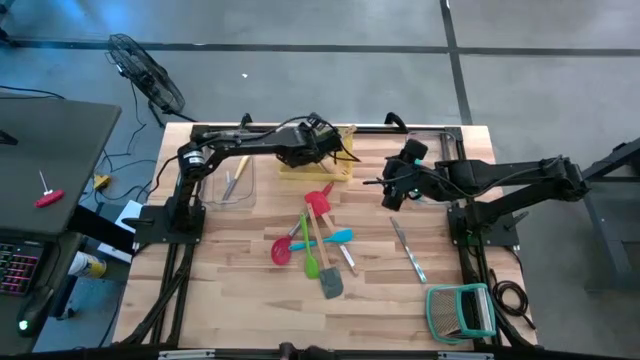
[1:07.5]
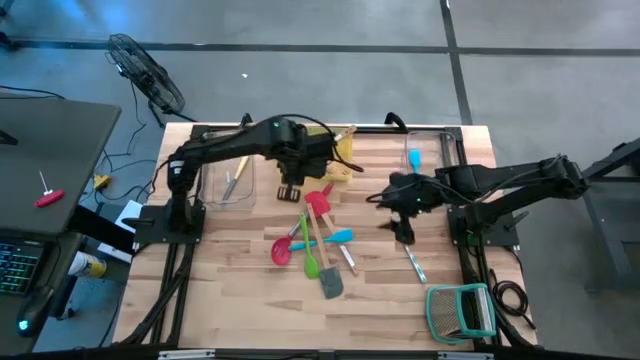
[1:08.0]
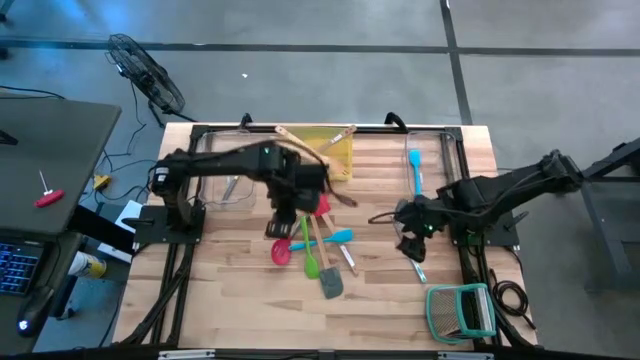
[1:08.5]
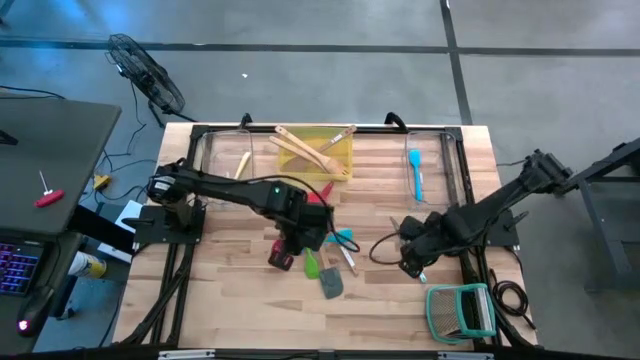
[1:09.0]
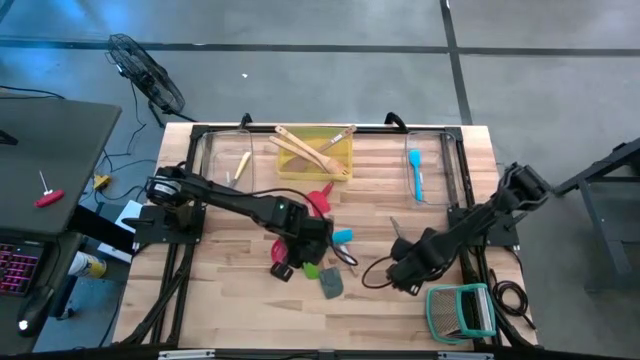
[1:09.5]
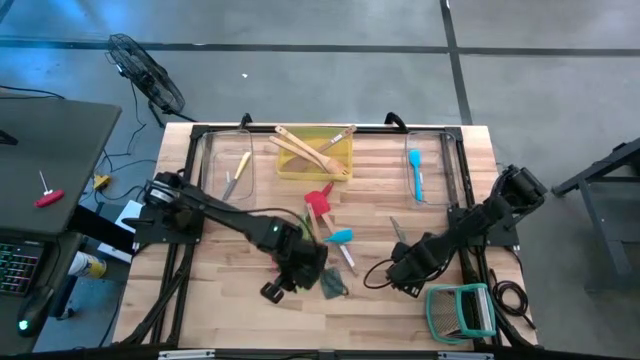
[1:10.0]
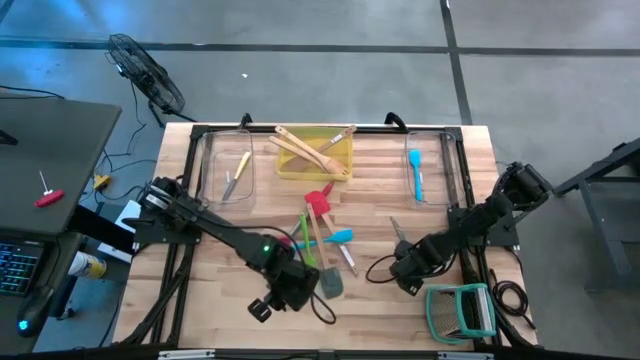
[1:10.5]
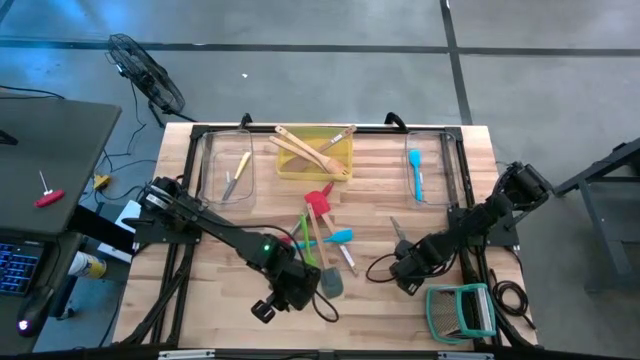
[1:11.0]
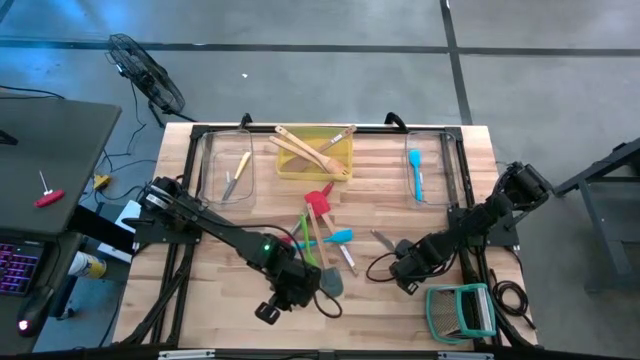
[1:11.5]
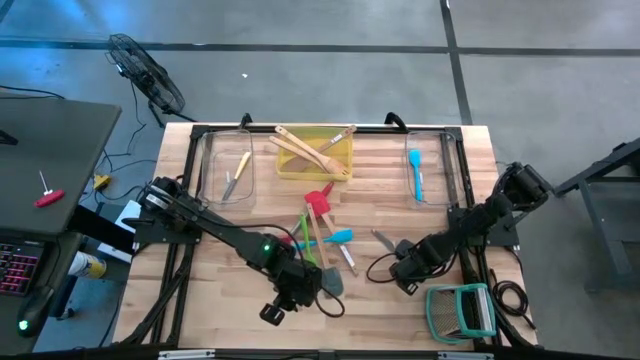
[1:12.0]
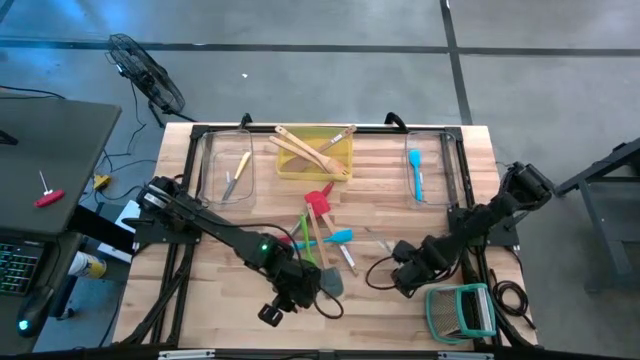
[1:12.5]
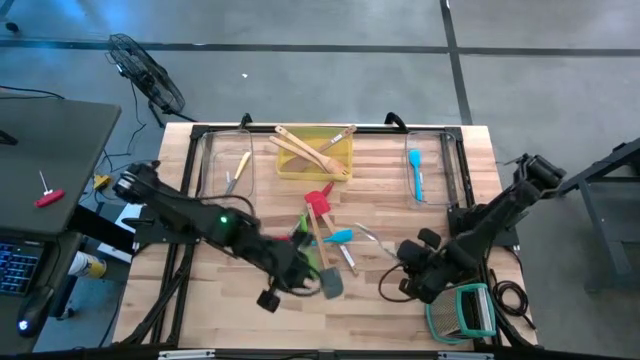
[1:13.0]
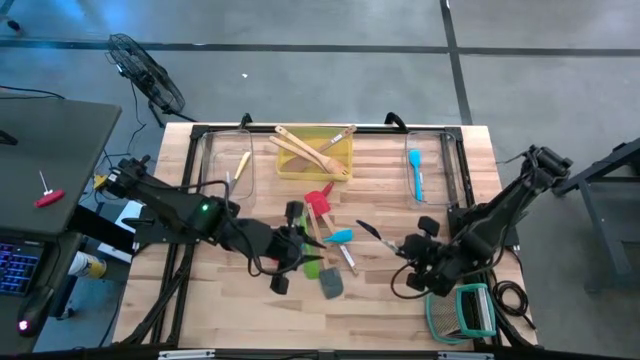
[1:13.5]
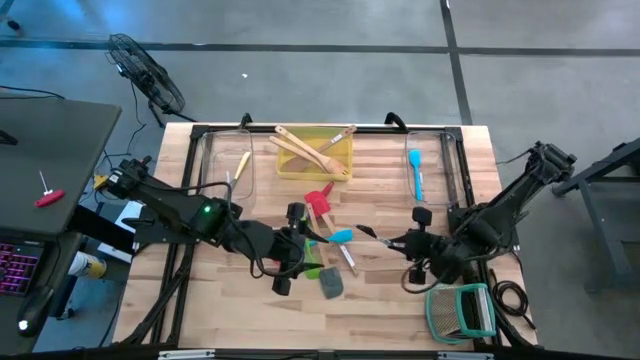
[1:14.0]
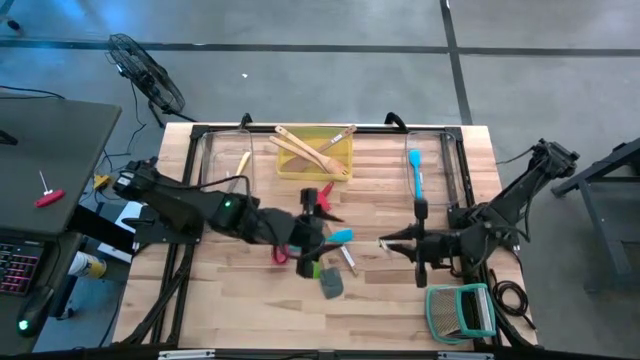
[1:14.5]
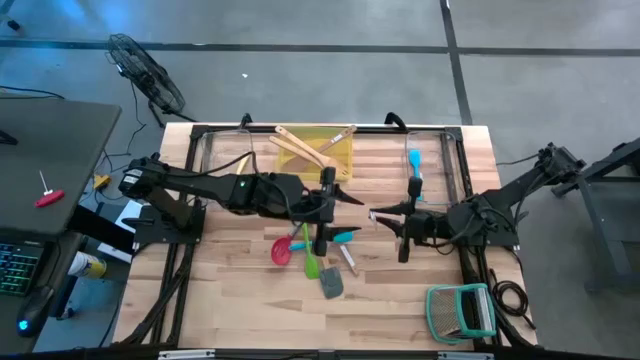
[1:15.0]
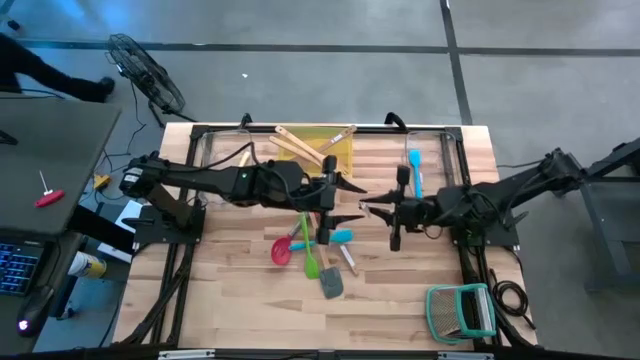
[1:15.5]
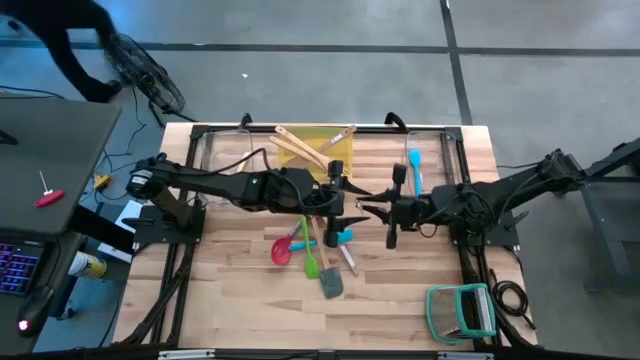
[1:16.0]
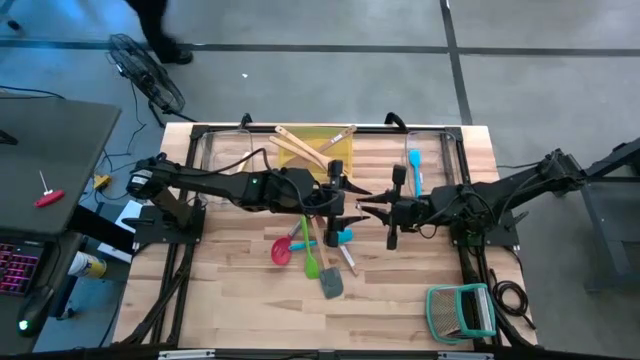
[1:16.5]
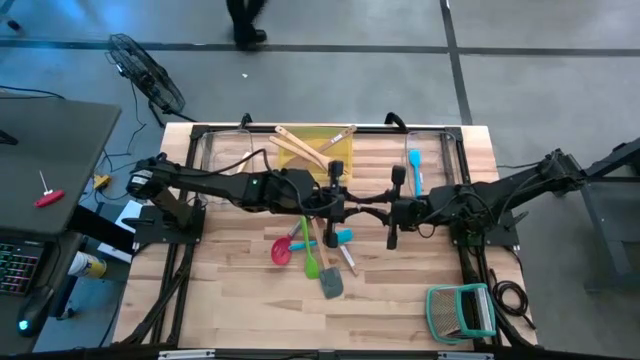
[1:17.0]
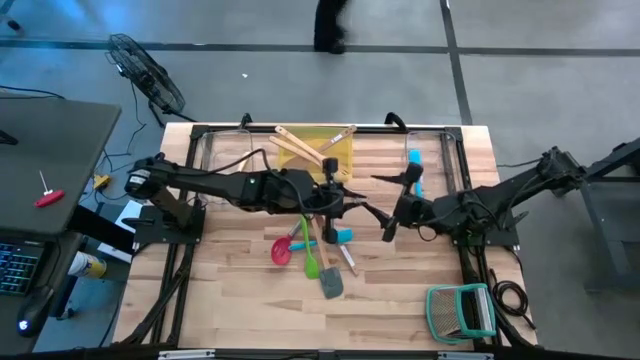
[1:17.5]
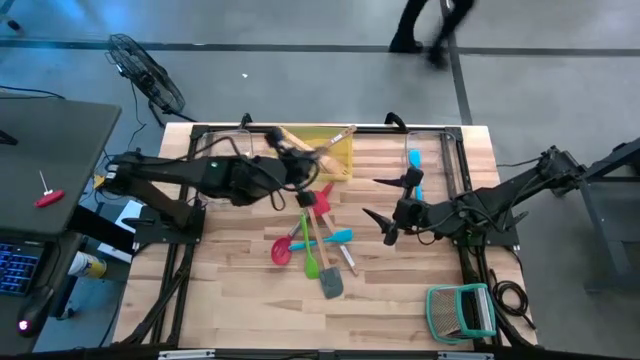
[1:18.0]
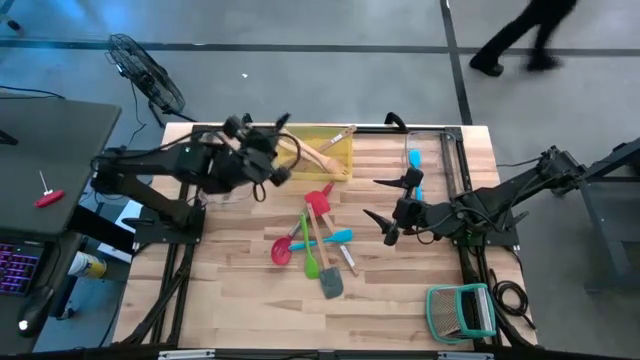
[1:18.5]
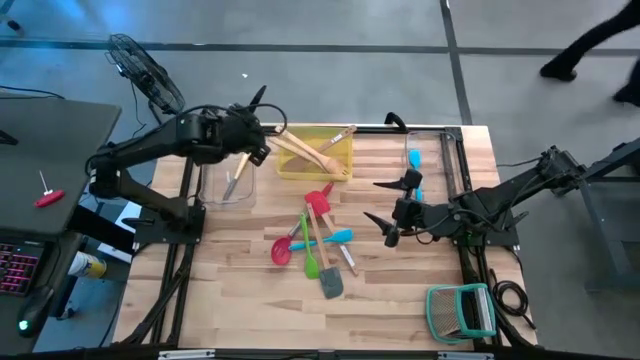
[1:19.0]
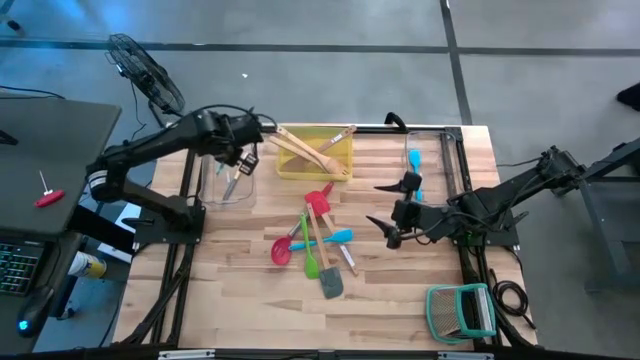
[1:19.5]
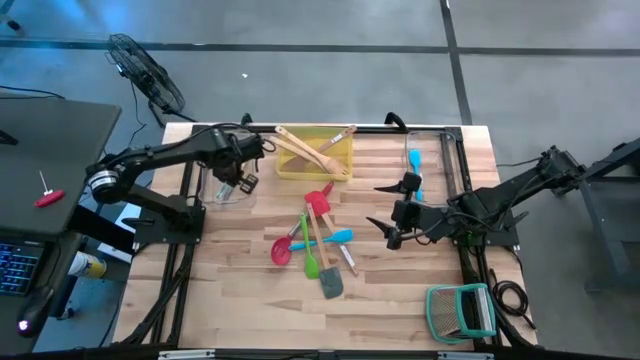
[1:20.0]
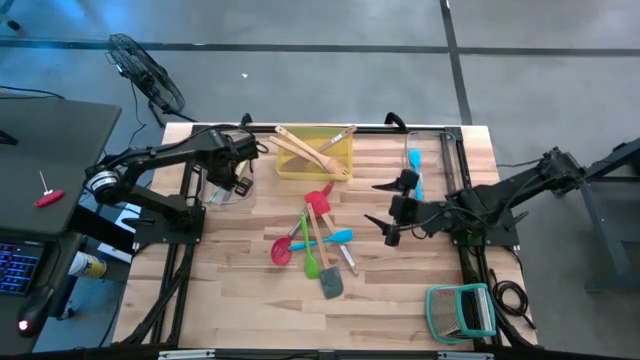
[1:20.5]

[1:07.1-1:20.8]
Task: Pick & Place Kitchen Items
Put the white knife into the left transparent bin

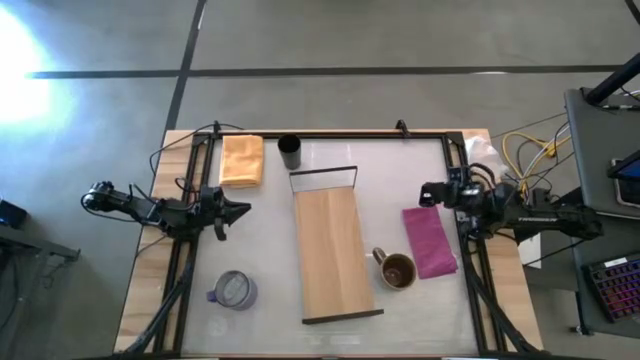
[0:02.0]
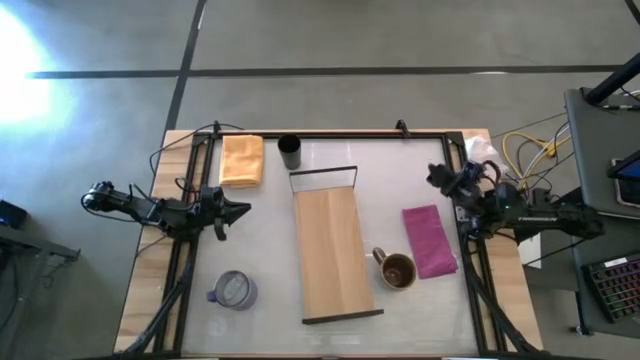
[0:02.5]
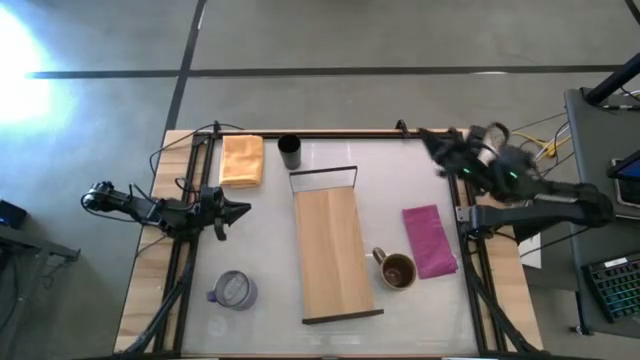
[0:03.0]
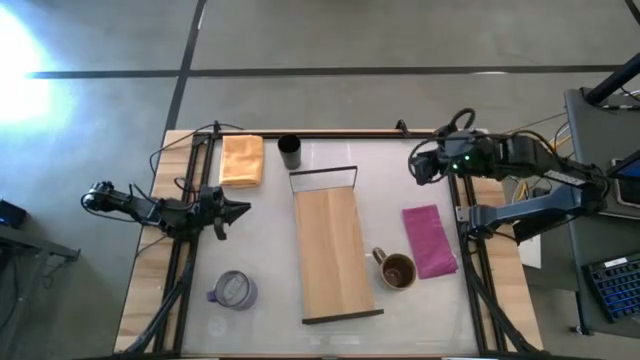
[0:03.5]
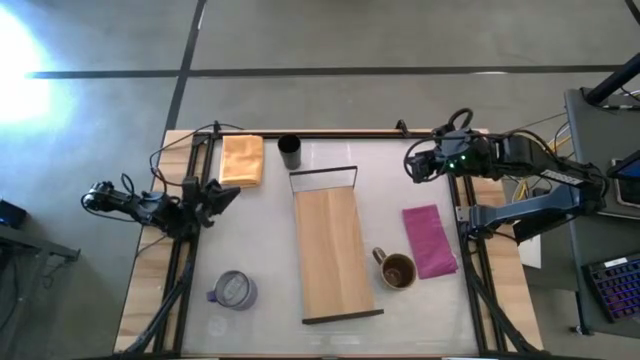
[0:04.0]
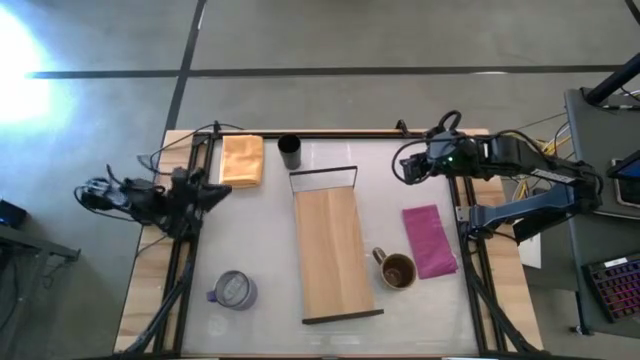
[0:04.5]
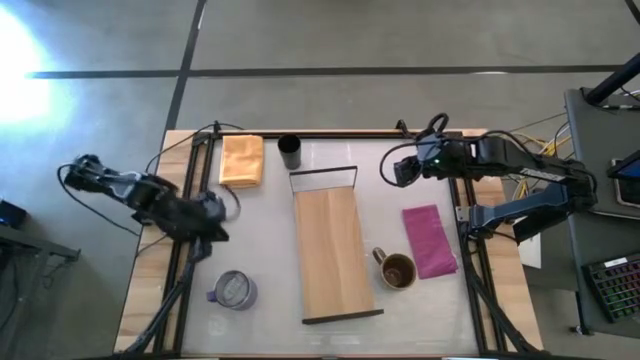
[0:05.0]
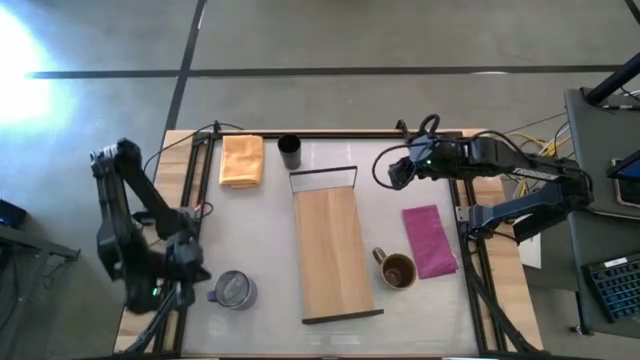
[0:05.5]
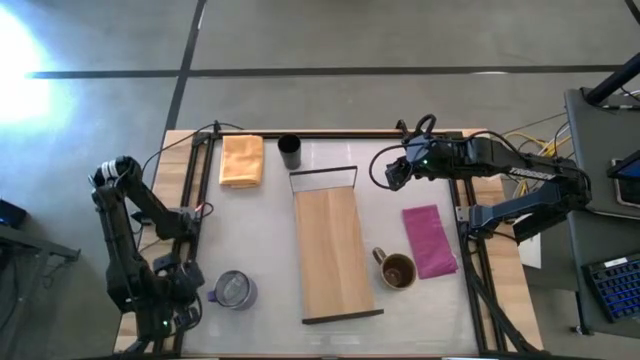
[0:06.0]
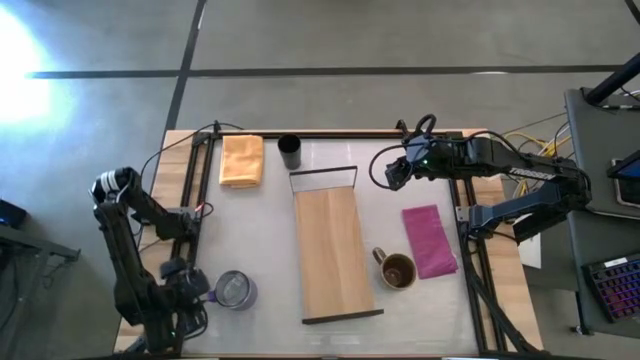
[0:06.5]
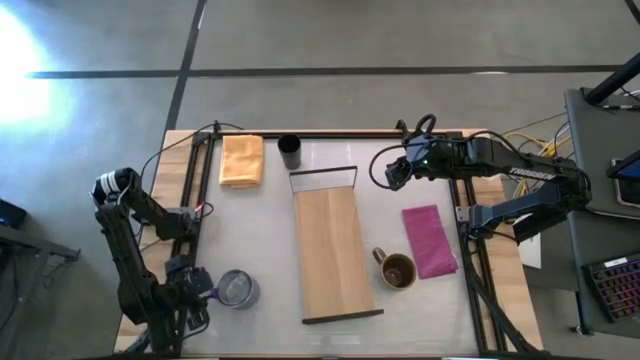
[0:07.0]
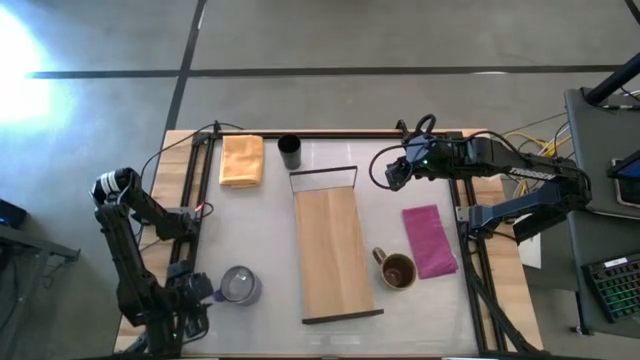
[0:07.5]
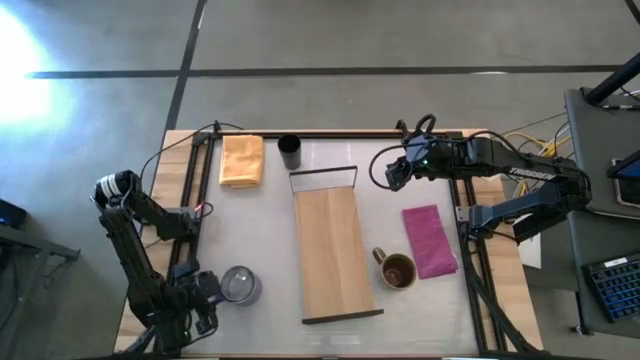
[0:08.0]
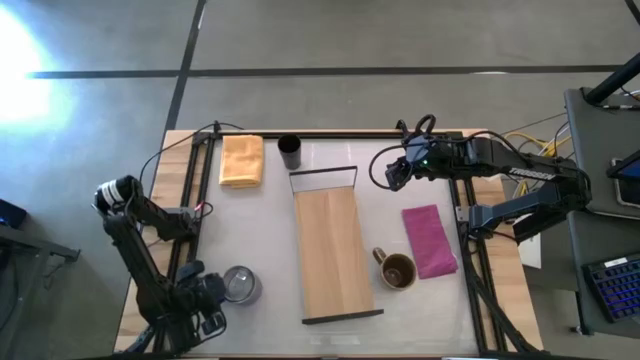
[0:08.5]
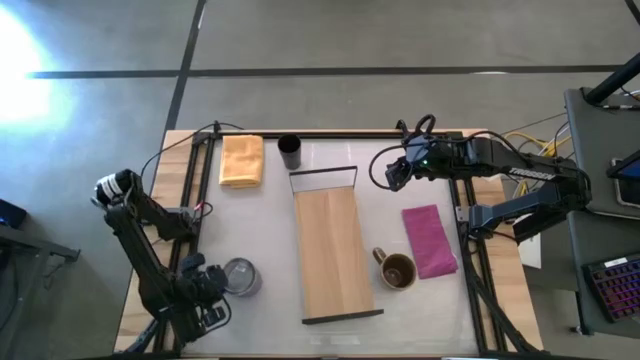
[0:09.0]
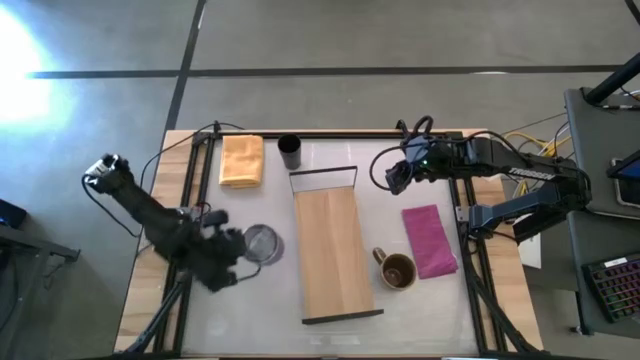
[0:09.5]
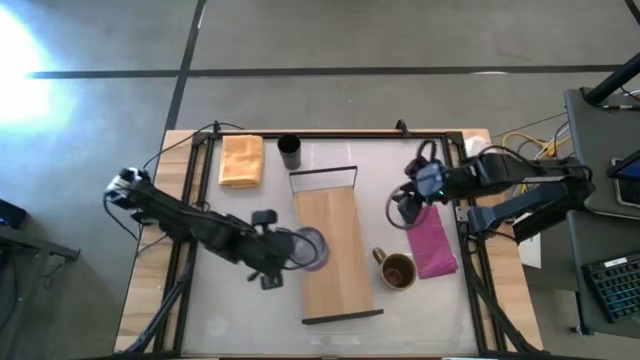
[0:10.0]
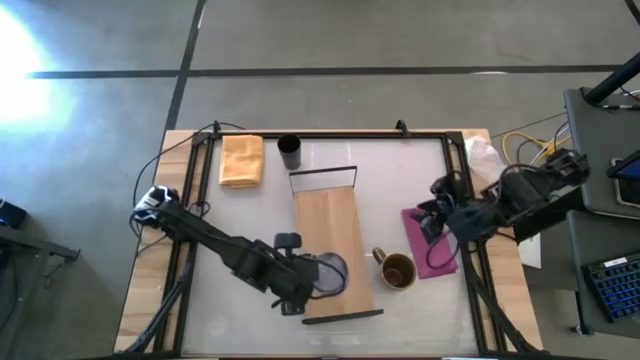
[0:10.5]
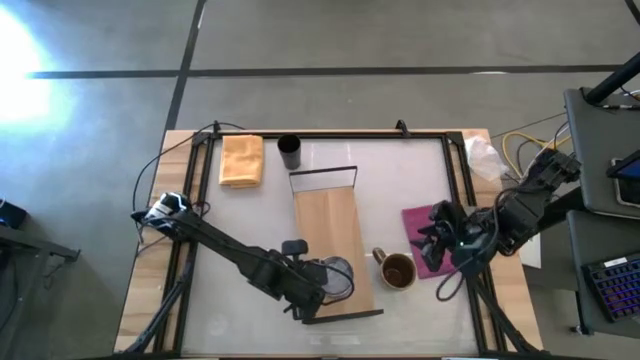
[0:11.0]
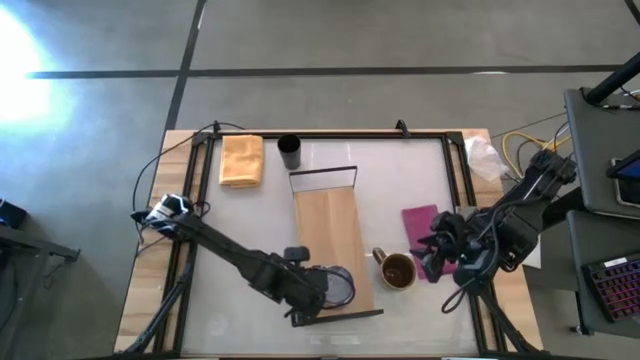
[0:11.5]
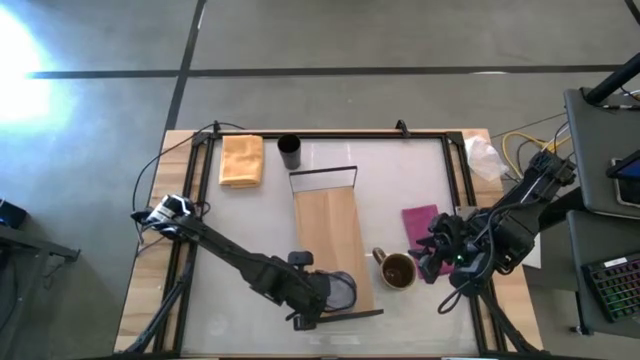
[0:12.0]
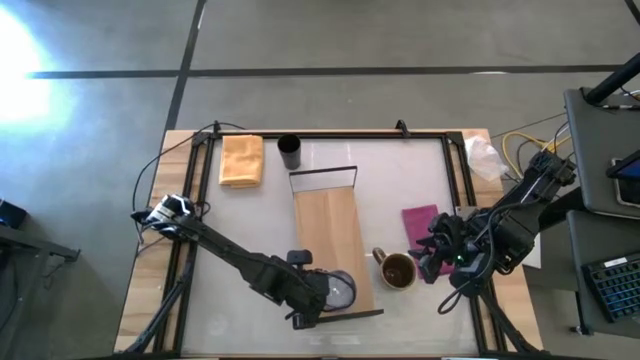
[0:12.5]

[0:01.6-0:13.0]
Task: Stack small to large cups/mugs on shelf
Put the purple mug on the shelf
